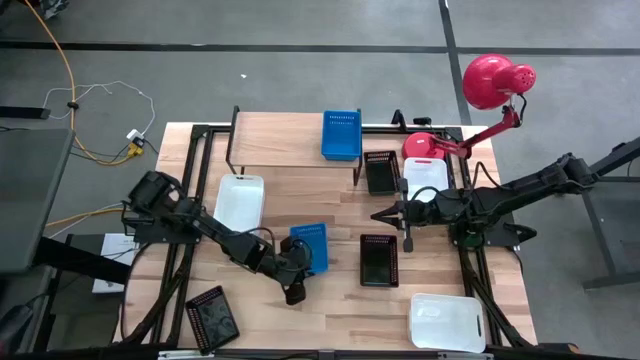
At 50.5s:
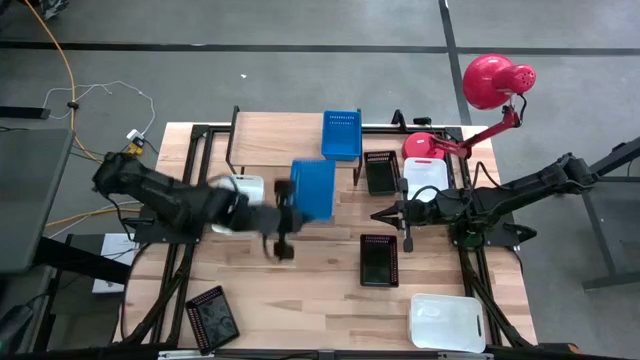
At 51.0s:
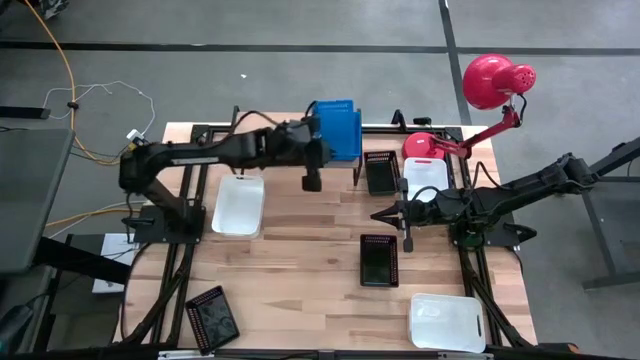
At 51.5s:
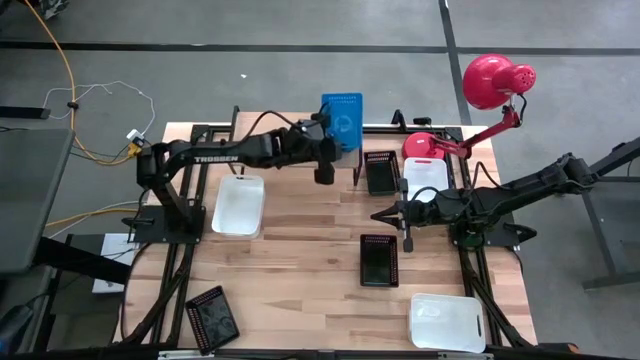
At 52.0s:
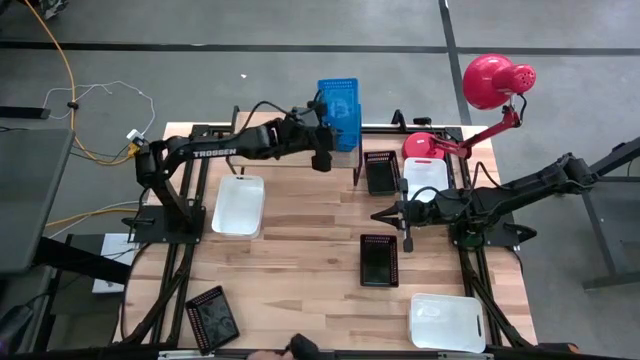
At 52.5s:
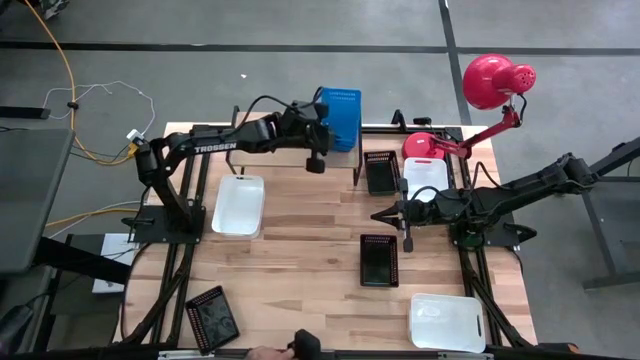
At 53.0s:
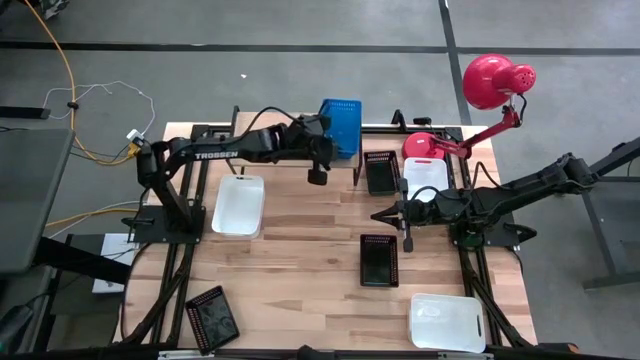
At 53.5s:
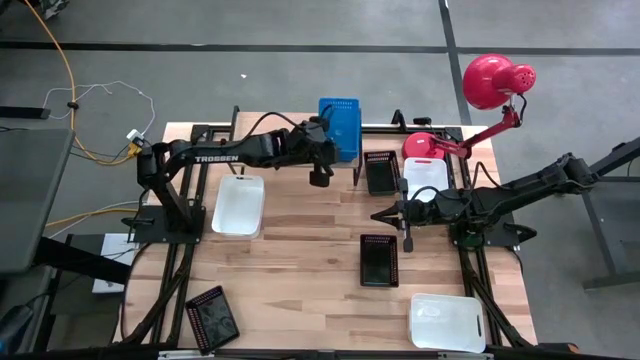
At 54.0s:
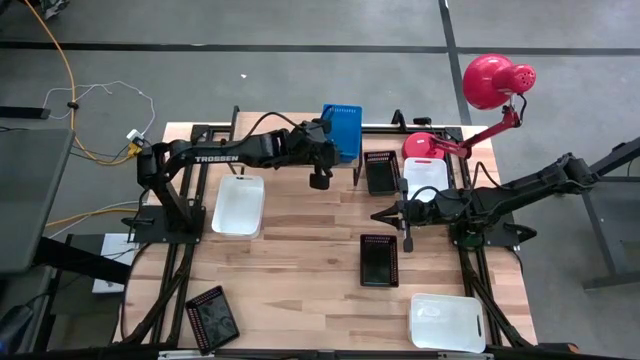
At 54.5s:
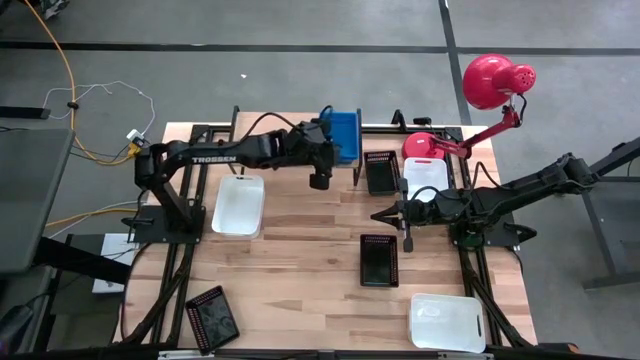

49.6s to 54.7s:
Task: Stack baskets on shelf by color
Stack the blue bin on the blue bin on the shelf

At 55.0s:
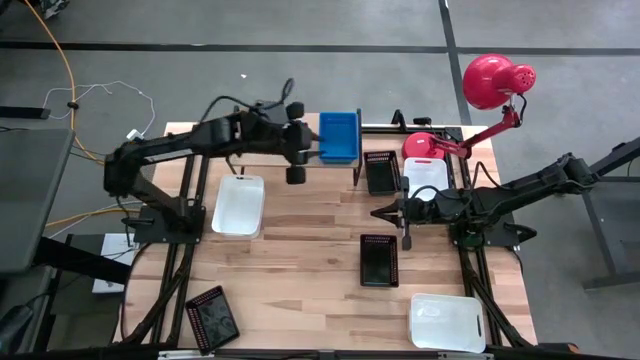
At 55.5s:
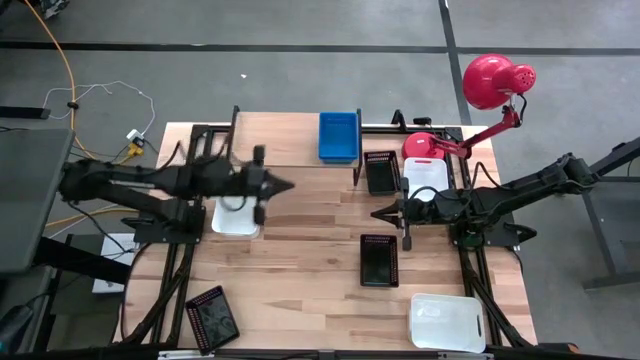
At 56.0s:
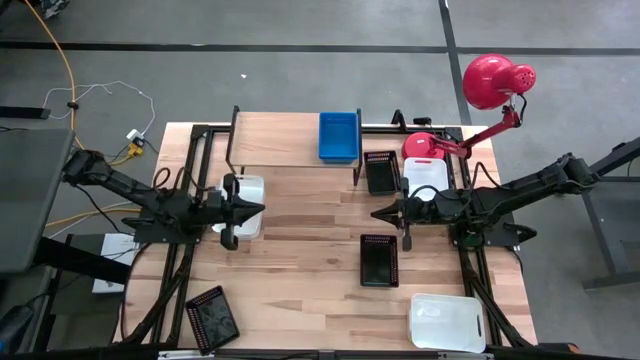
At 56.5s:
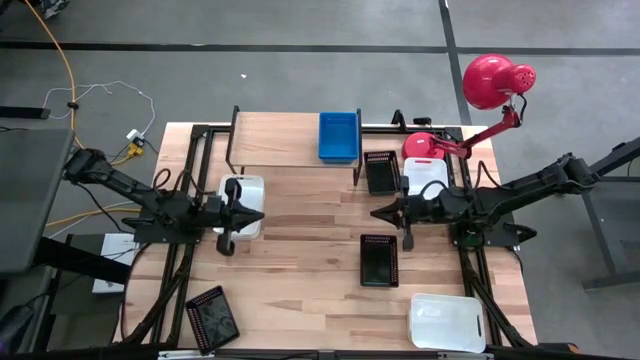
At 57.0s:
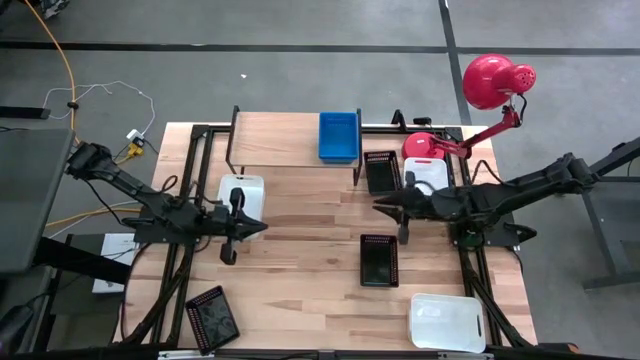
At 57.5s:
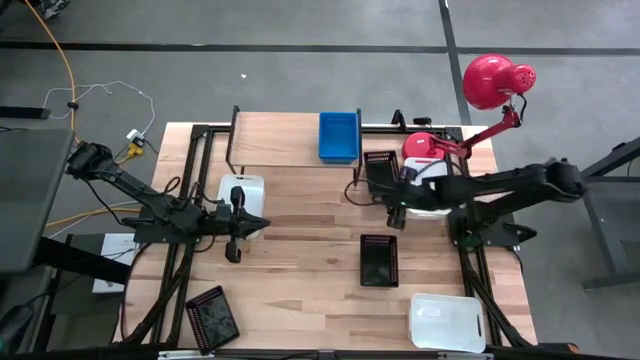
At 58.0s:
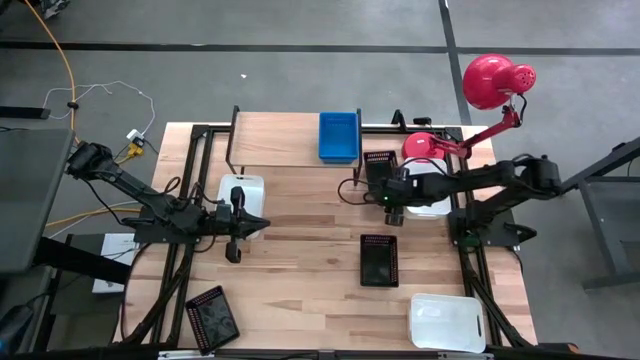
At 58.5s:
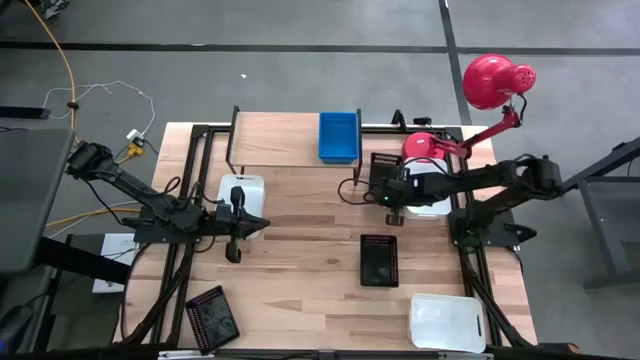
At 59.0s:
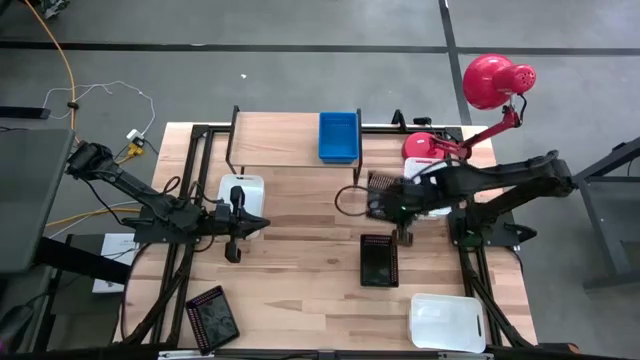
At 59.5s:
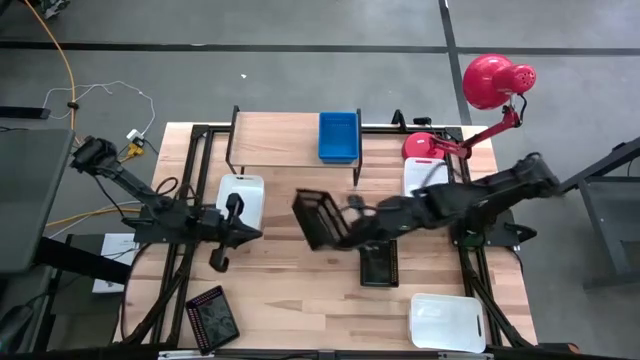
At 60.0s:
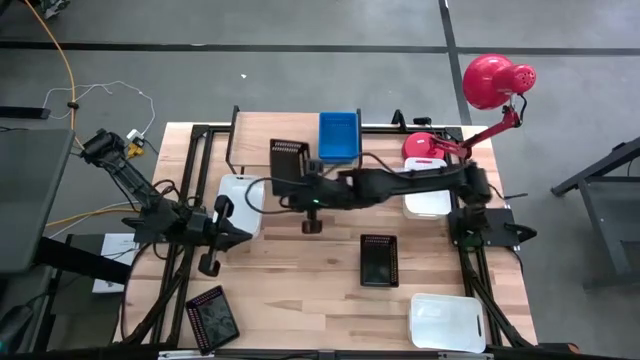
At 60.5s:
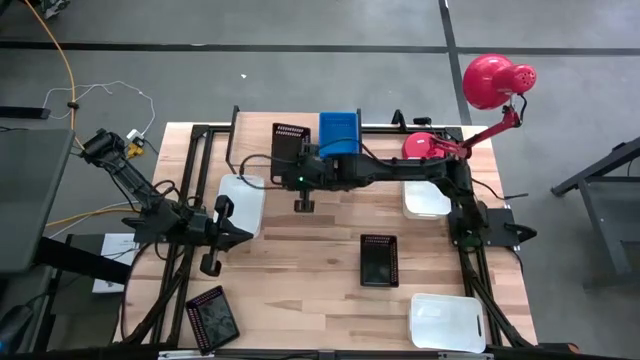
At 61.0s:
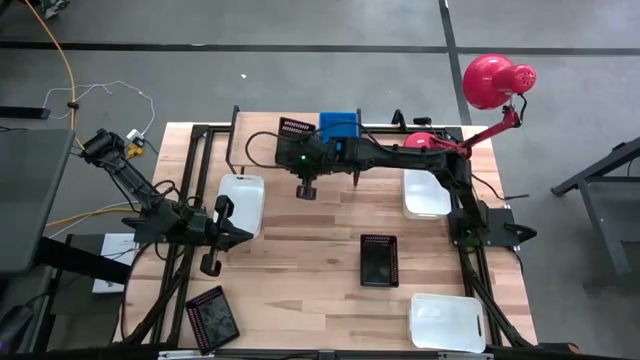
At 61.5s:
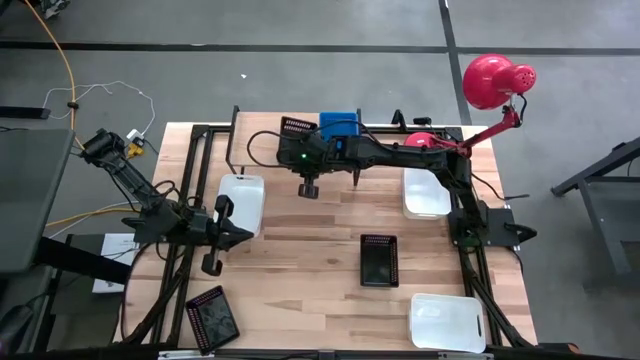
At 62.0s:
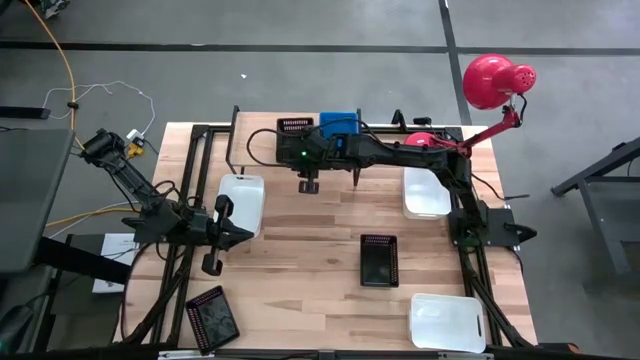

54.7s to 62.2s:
Put the top right black bin on the shelf

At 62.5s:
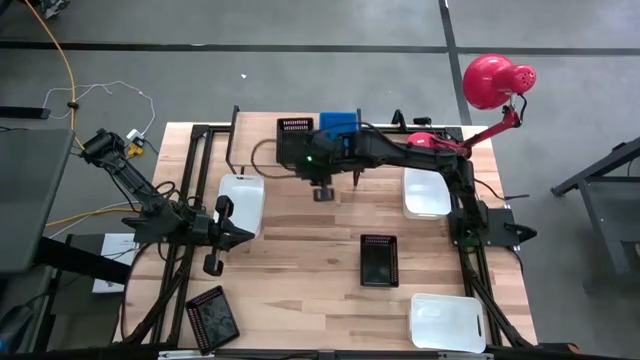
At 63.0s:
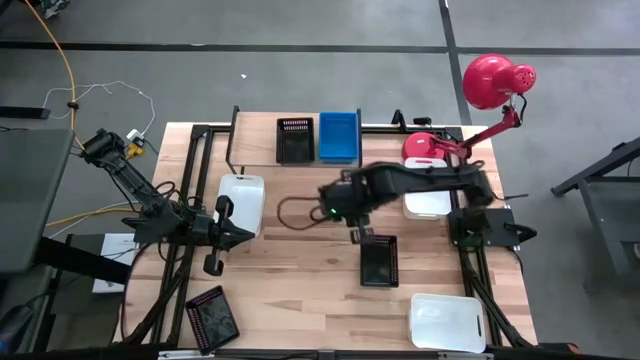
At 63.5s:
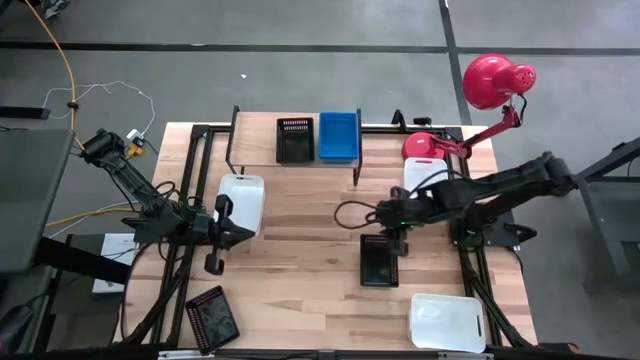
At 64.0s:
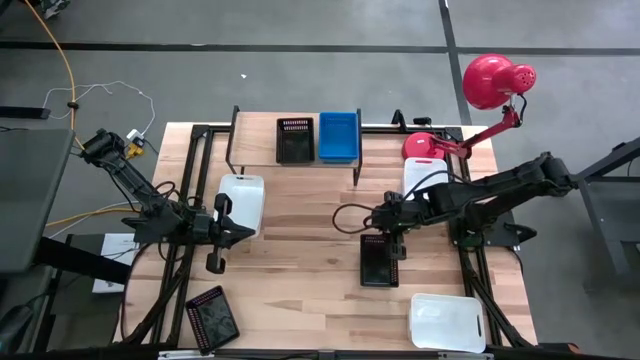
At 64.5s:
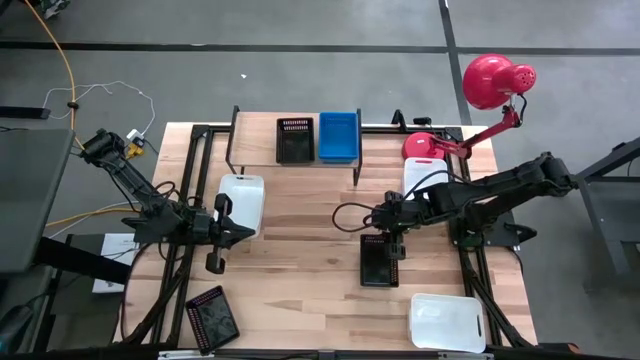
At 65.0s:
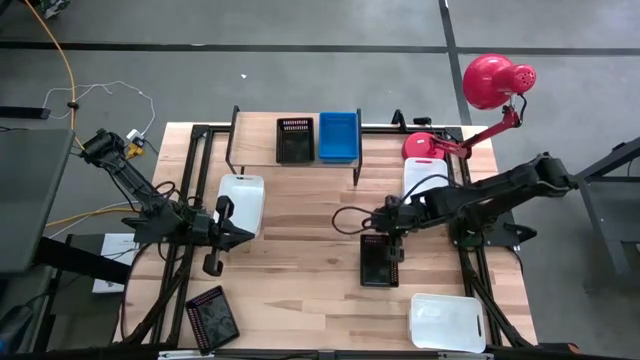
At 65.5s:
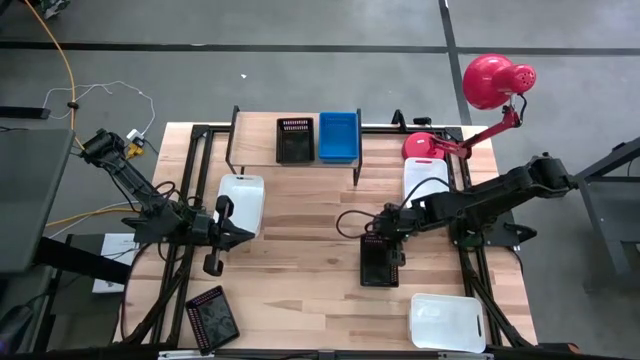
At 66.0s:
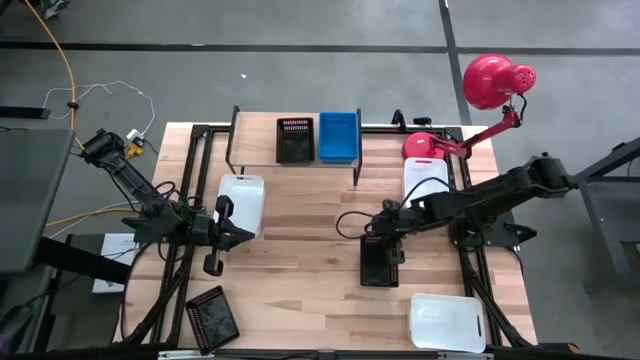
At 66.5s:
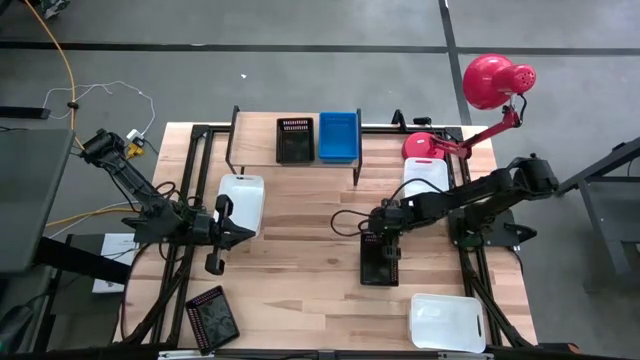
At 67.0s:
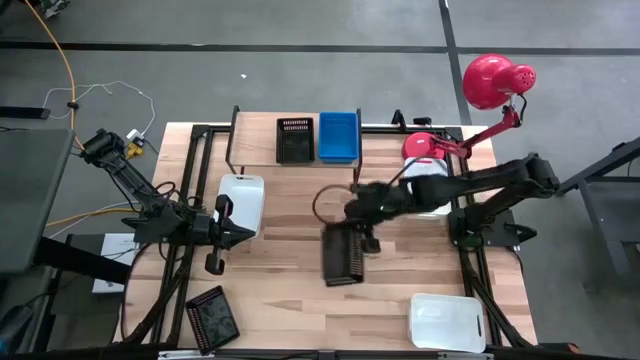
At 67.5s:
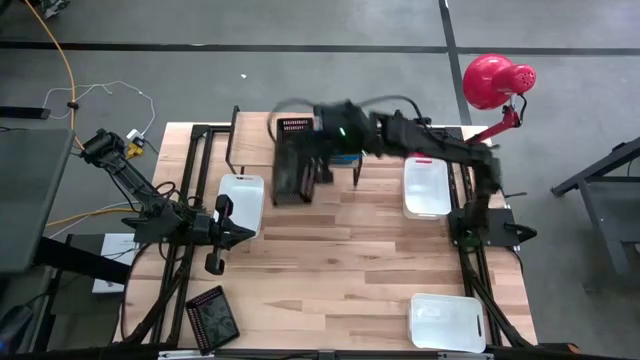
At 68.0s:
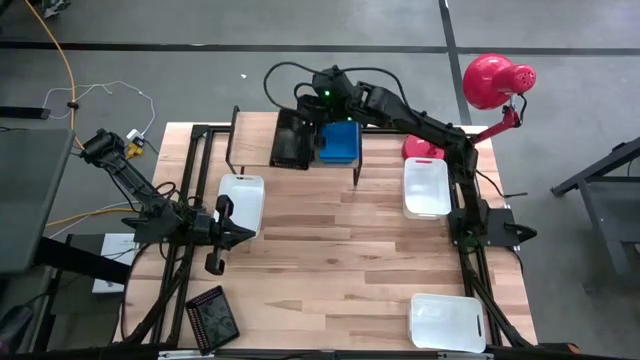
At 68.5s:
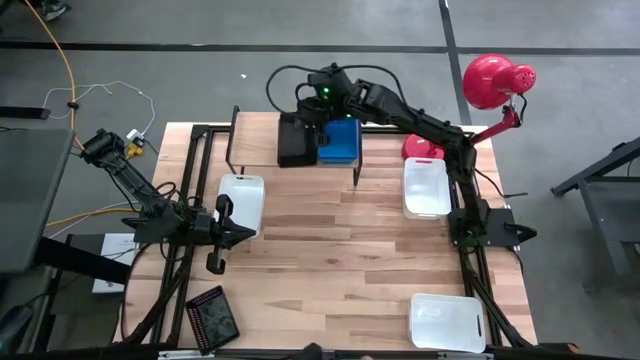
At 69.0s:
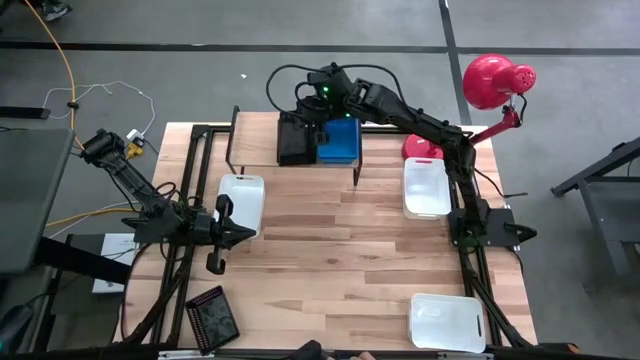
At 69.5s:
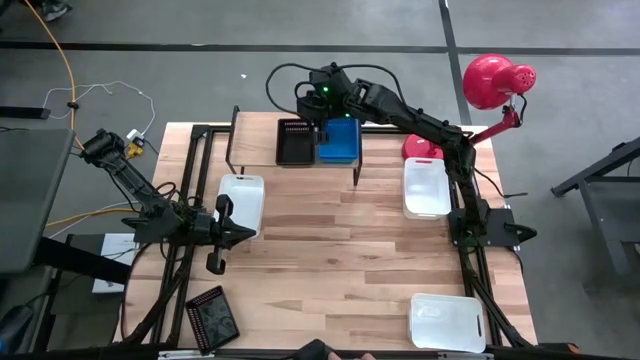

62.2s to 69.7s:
Stack the top black bin on the black bin on the shelf

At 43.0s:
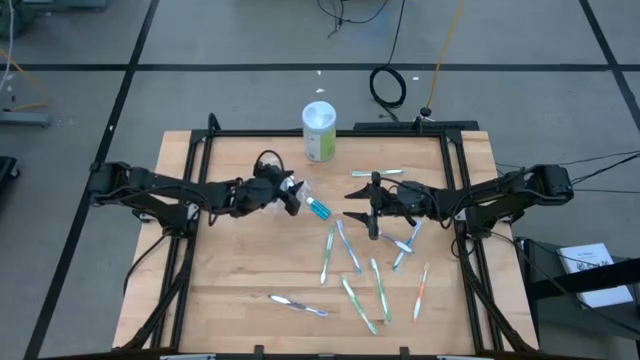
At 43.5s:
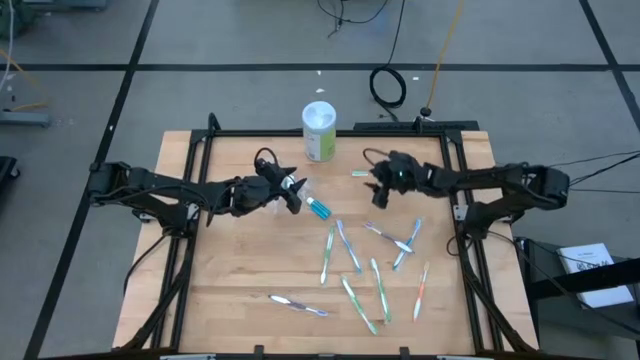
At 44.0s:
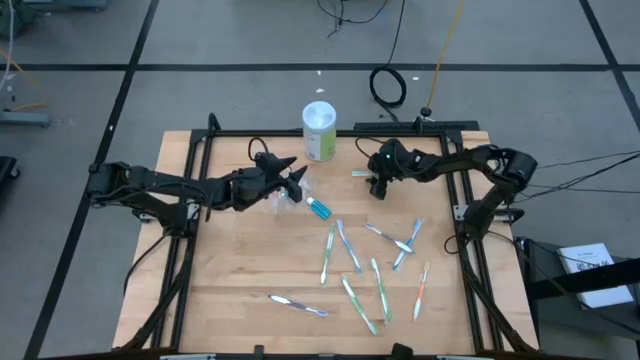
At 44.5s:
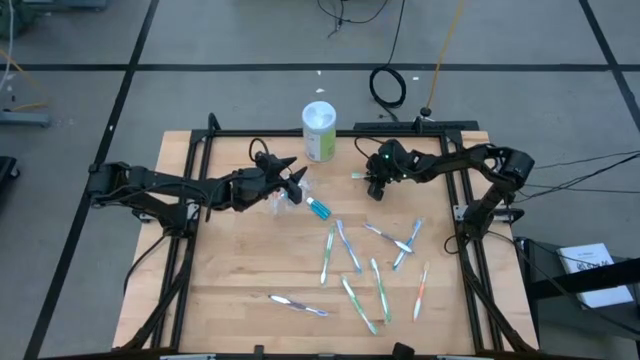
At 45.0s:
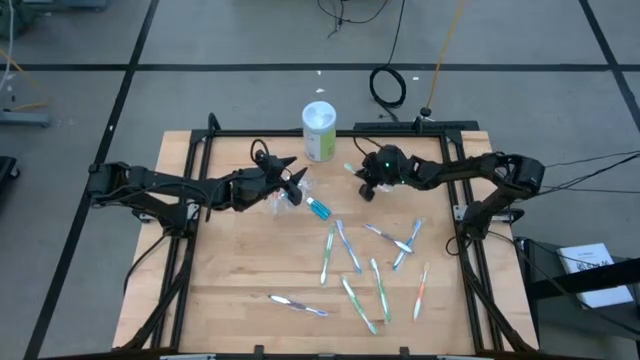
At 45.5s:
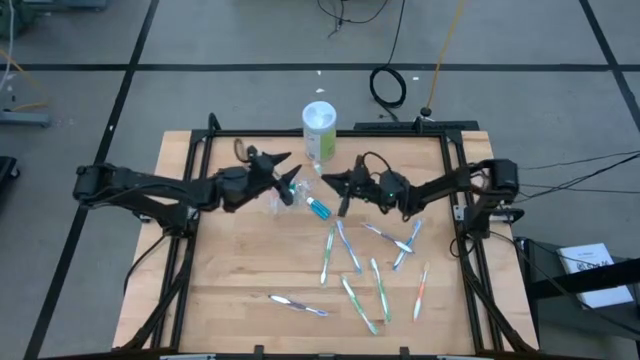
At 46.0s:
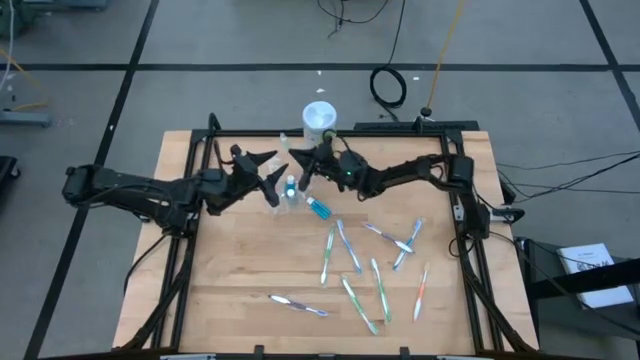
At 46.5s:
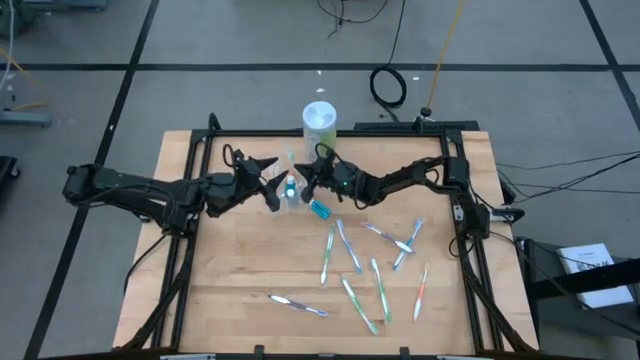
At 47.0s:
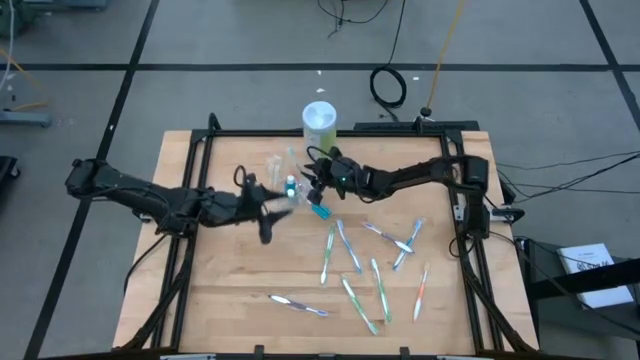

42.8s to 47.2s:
Task: Pick & Place toothbrushing station
Put the green toothbrush into the transparent organizer
